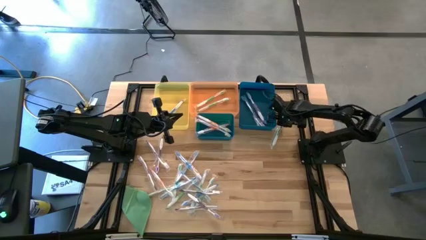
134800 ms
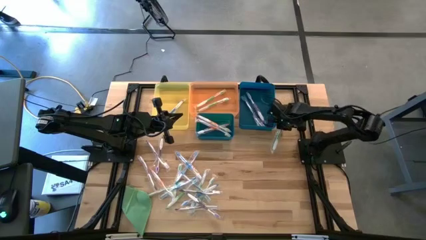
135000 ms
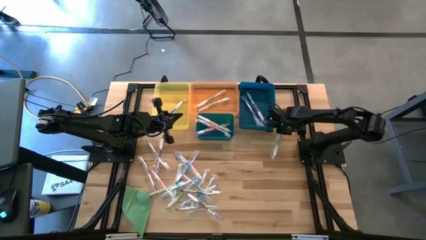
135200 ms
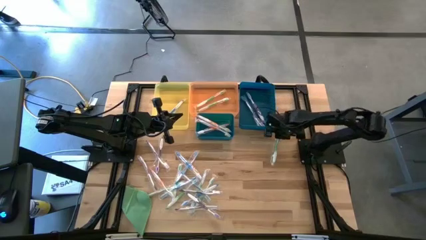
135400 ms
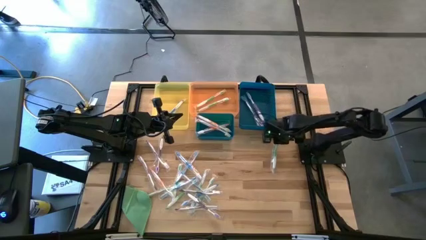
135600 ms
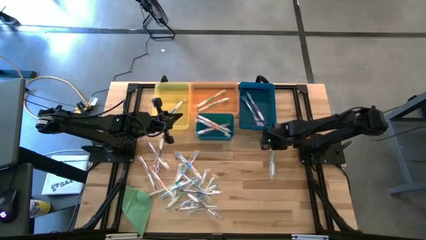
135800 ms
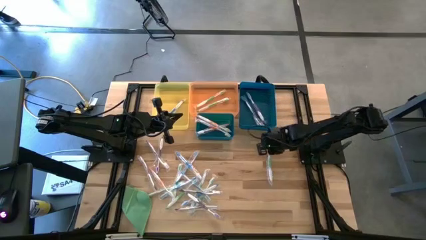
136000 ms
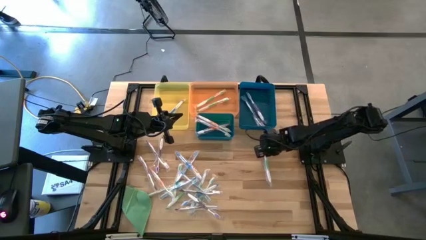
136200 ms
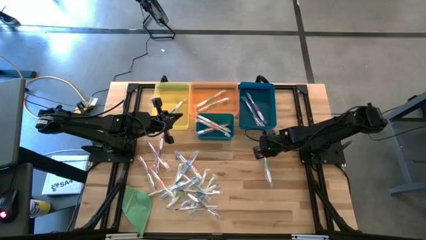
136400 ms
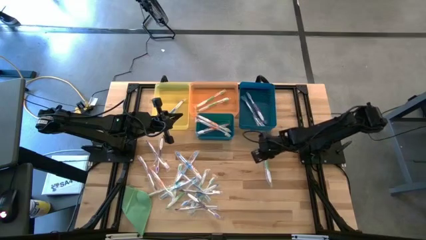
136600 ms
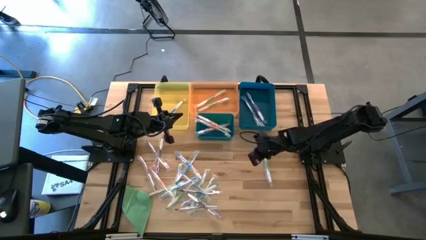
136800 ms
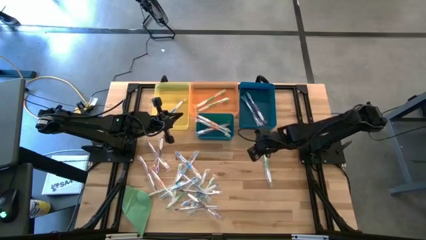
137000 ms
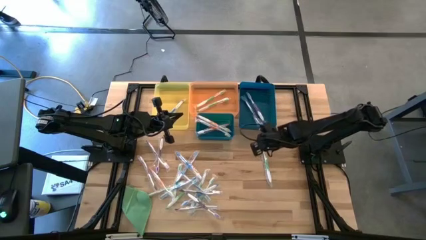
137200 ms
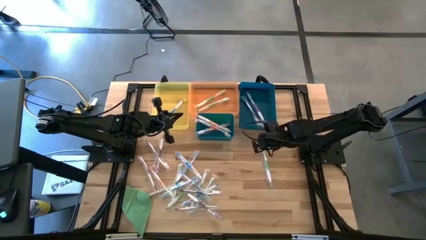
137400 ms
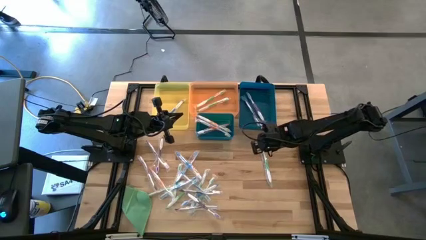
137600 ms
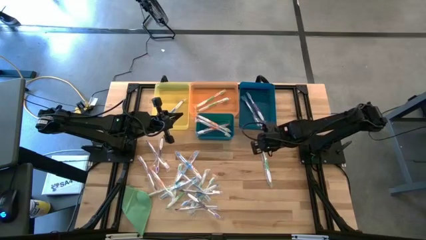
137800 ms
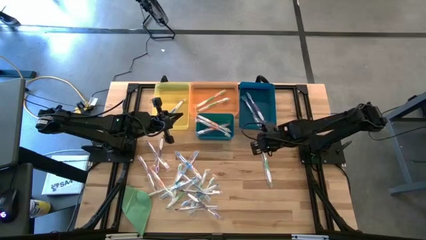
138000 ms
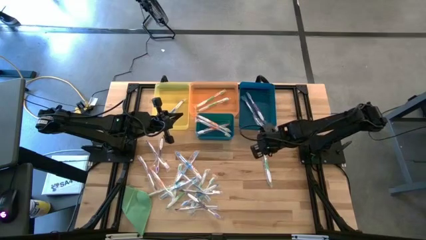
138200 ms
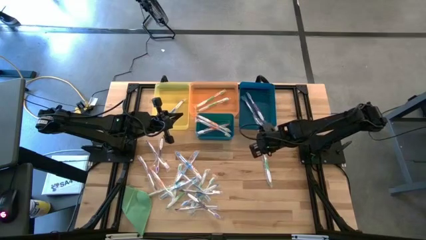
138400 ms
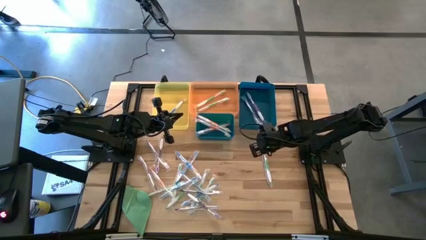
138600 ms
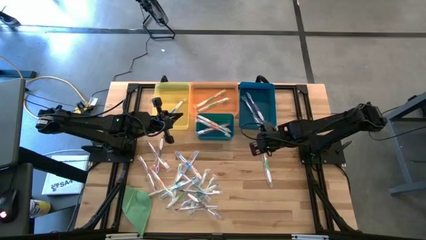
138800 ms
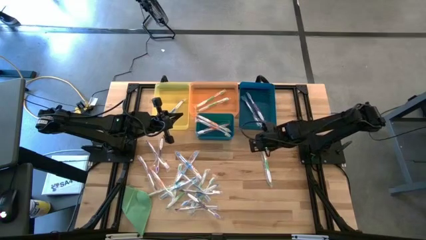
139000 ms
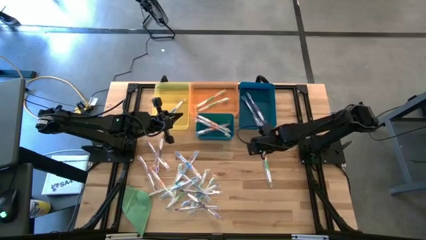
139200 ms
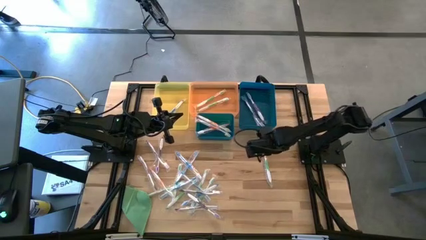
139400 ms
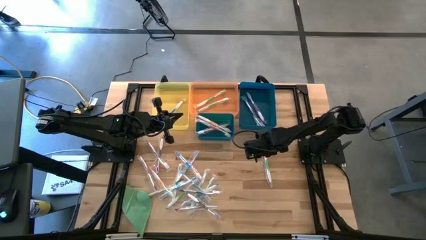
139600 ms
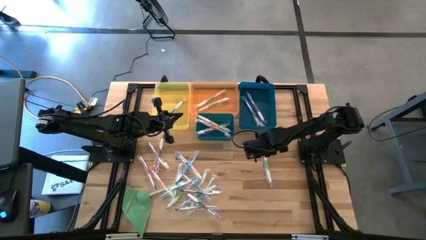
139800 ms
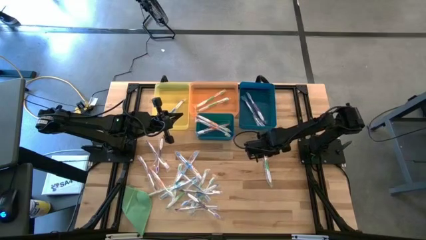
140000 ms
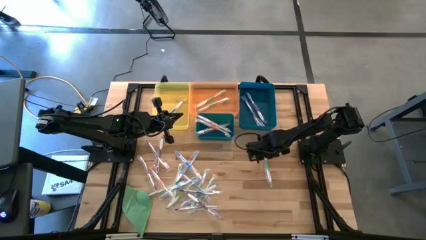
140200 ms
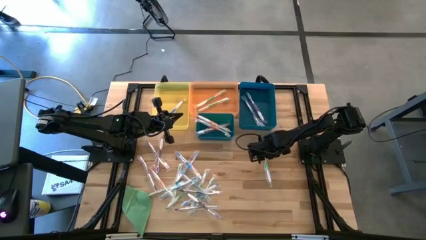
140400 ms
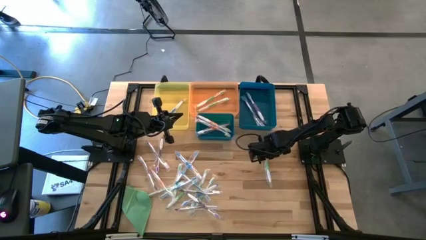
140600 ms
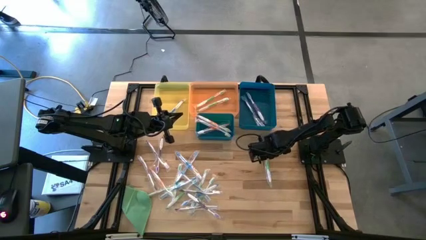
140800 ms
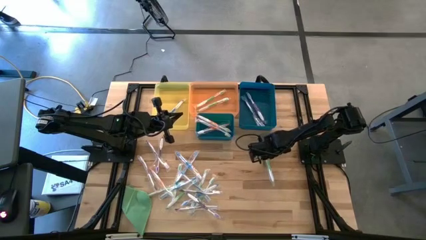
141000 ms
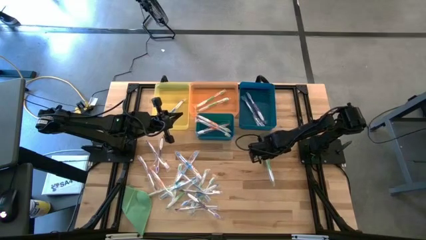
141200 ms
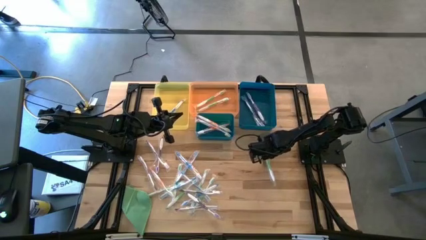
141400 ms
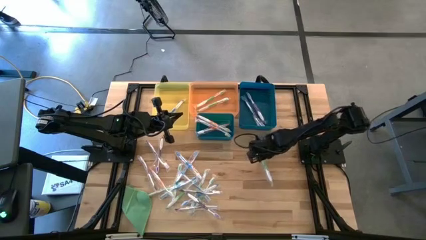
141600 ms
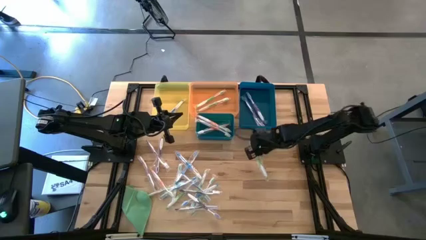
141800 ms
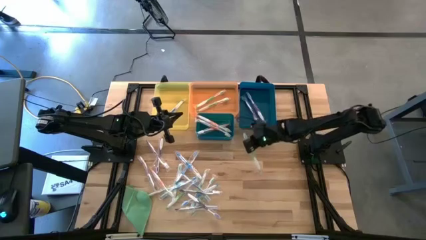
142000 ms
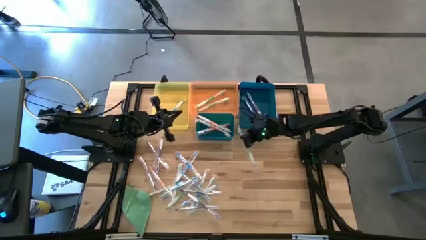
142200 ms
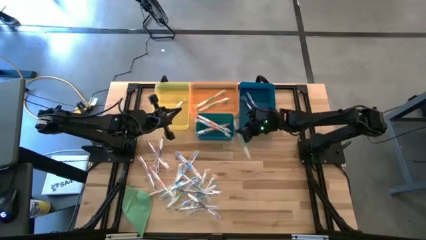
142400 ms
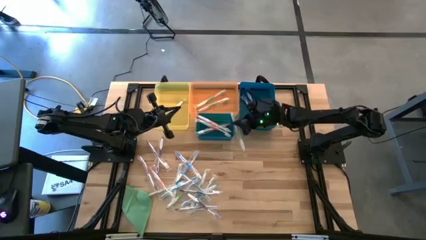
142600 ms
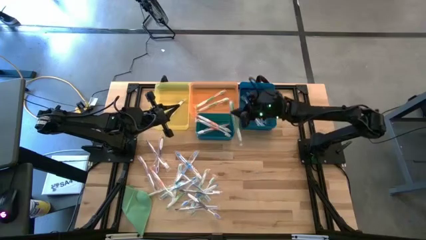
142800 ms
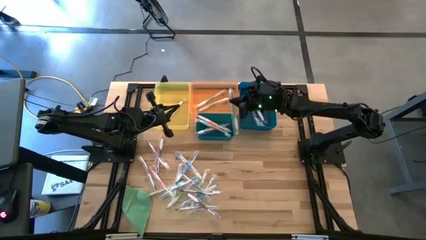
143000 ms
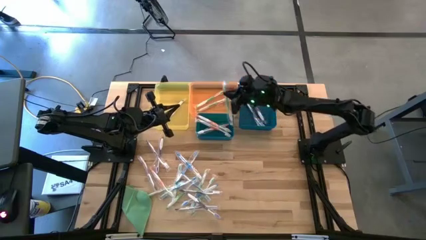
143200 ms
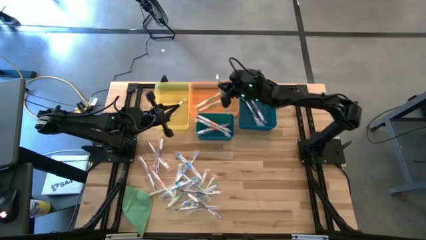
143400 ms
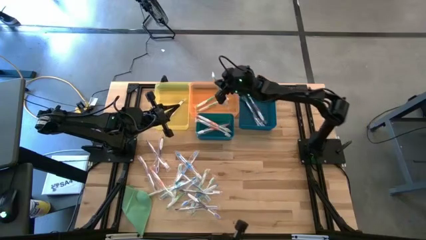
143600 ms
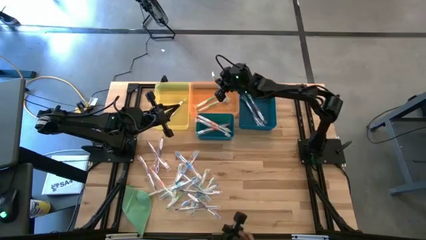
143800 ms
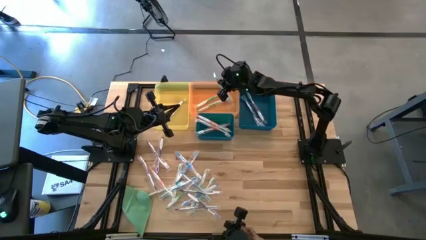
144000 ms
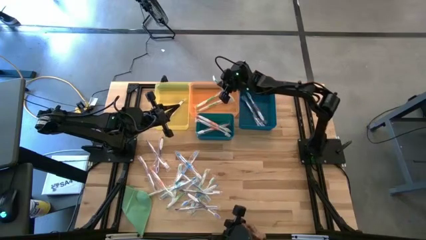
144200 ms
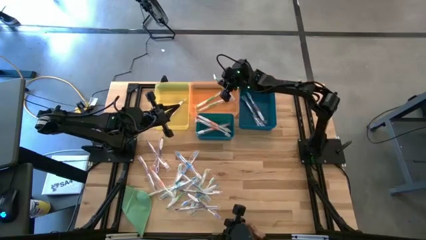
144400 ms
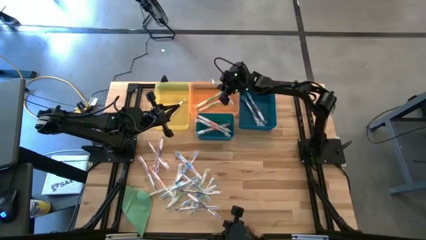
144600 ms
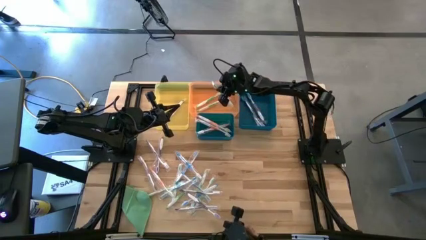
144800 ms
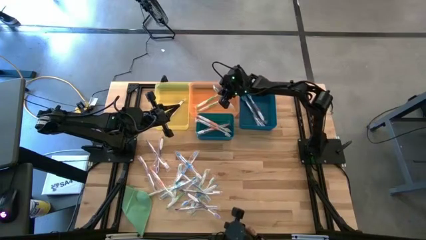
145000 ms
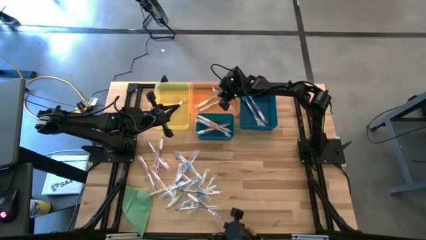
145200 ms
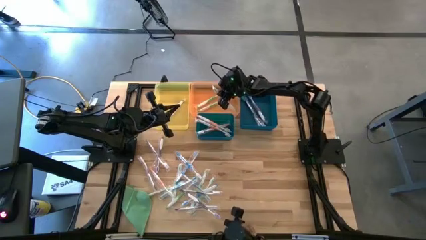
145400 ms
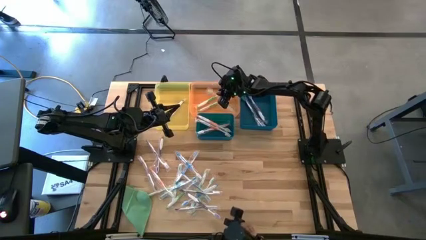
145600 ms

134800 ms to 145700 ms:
Task: Pick & Place Toothbrushes
Put the green toothbrush into the orange bin
